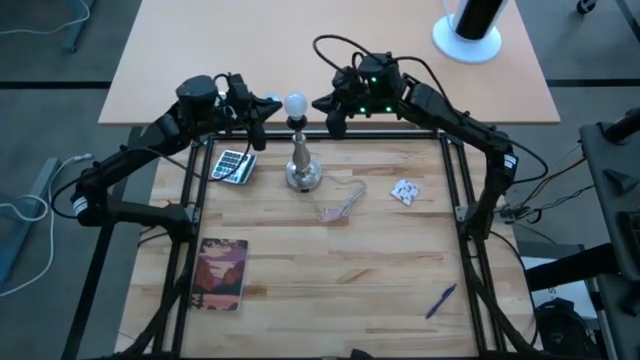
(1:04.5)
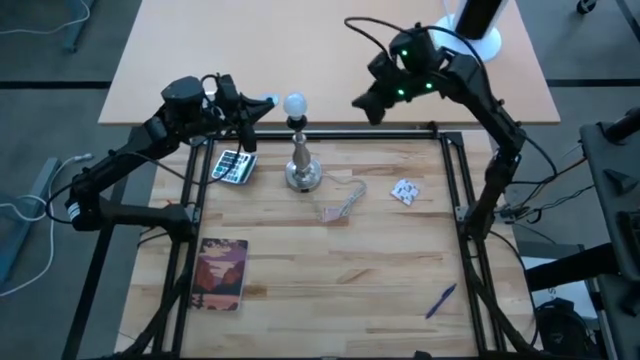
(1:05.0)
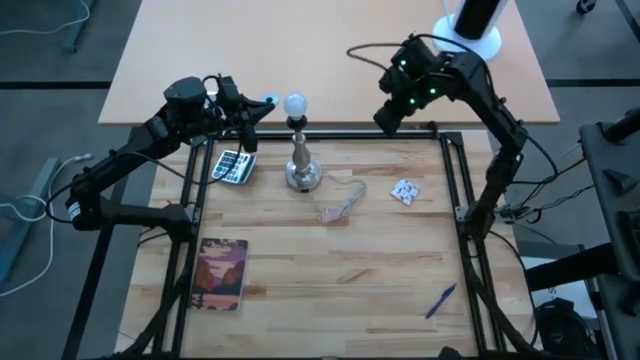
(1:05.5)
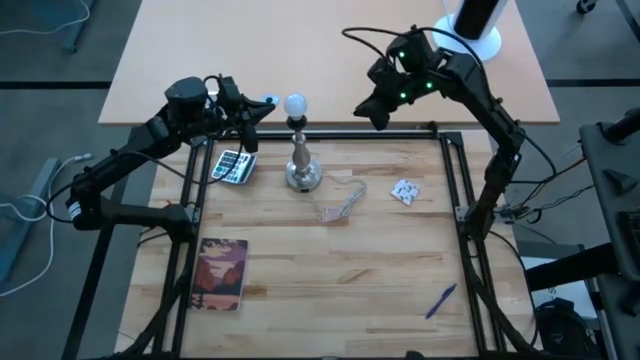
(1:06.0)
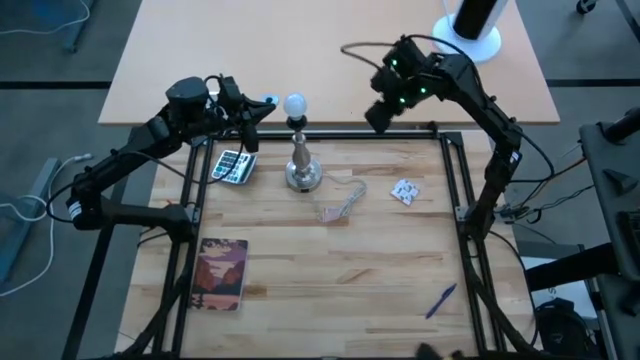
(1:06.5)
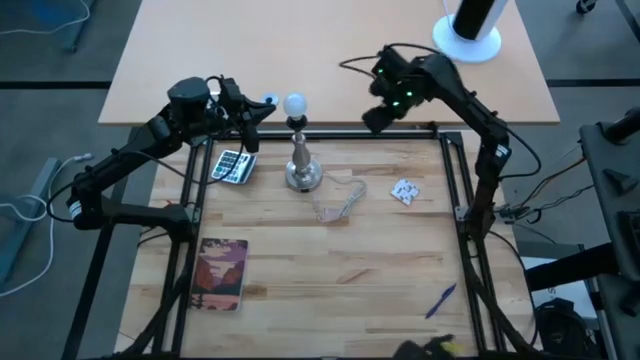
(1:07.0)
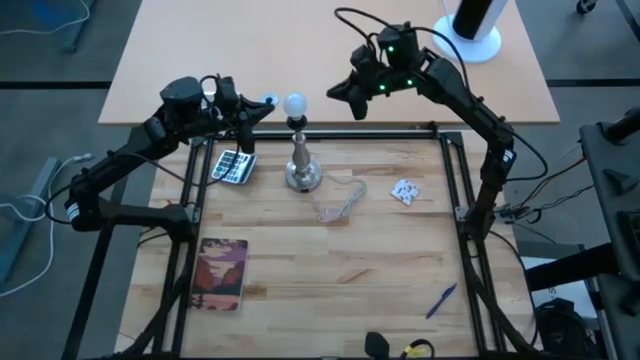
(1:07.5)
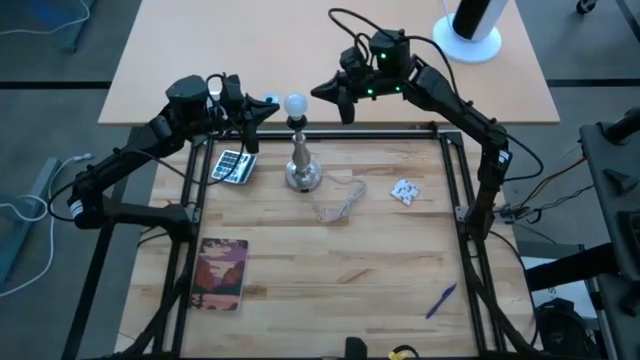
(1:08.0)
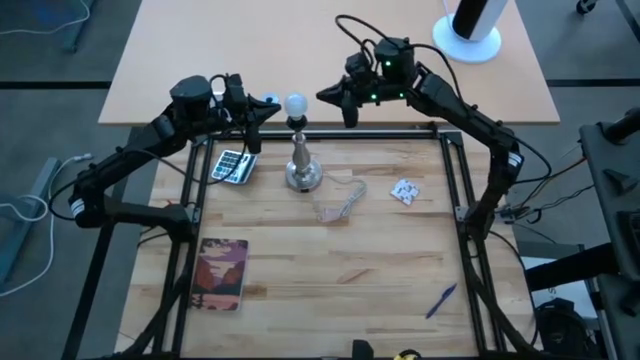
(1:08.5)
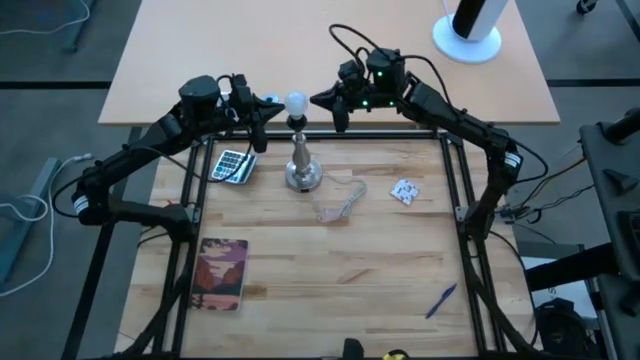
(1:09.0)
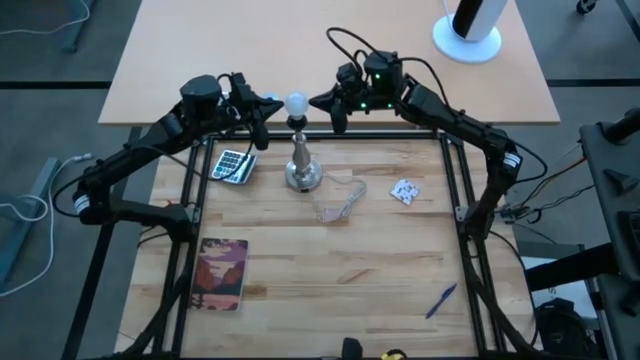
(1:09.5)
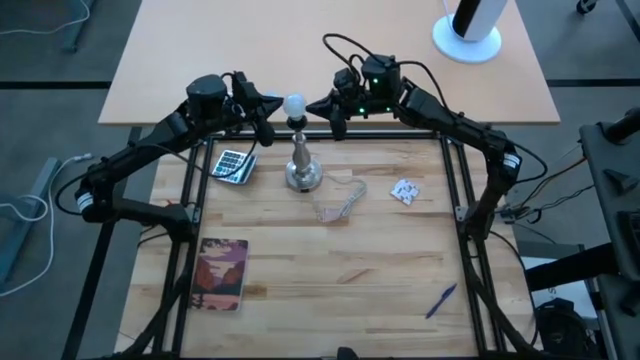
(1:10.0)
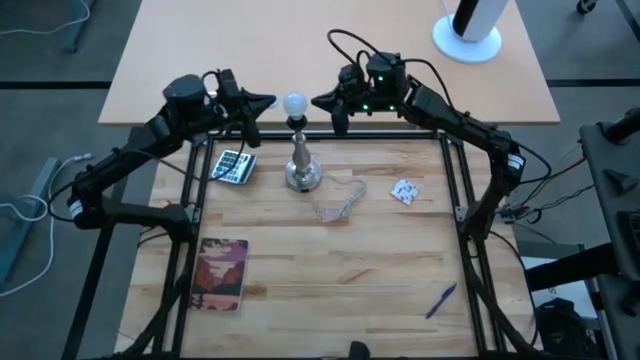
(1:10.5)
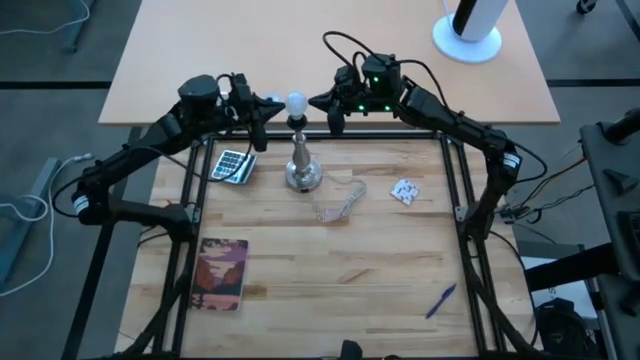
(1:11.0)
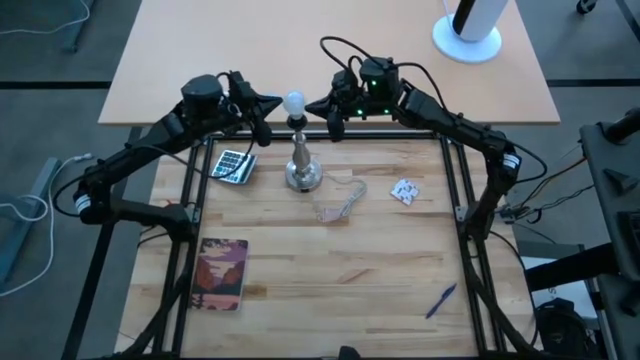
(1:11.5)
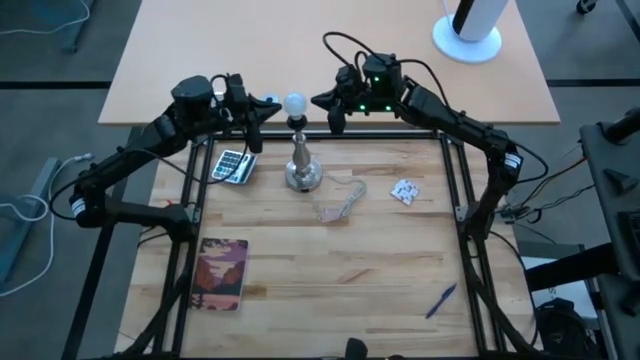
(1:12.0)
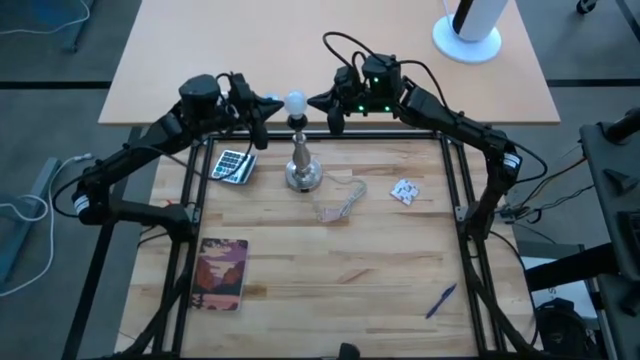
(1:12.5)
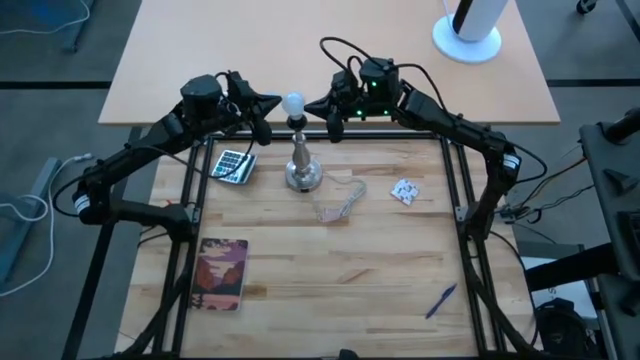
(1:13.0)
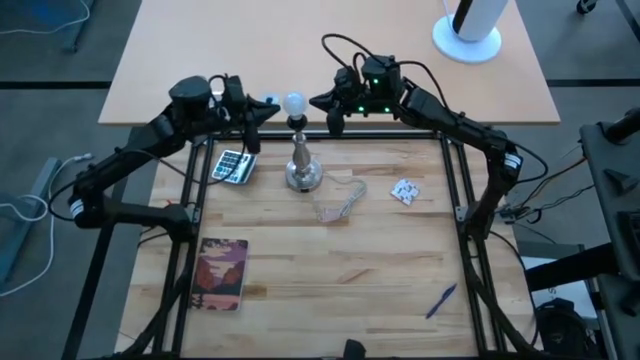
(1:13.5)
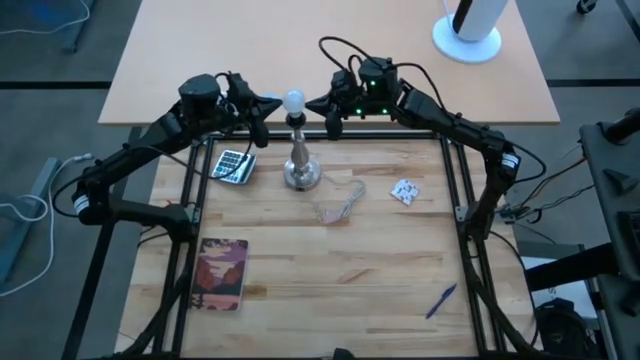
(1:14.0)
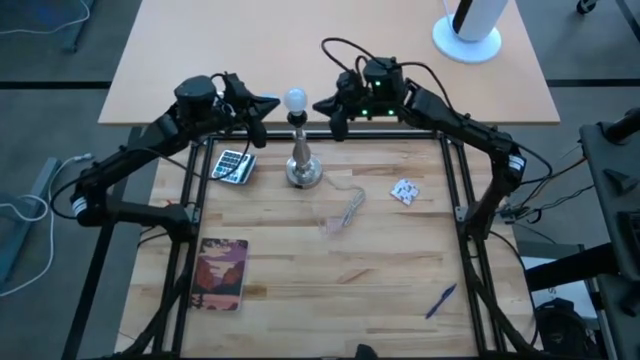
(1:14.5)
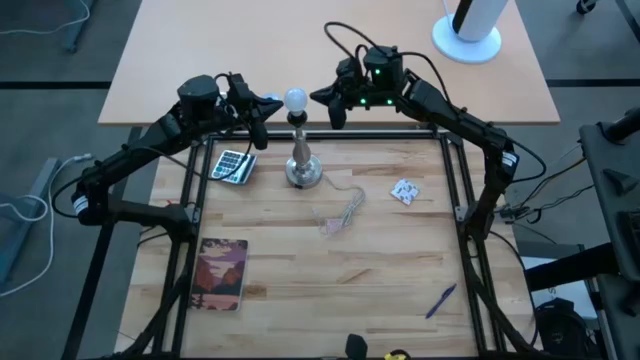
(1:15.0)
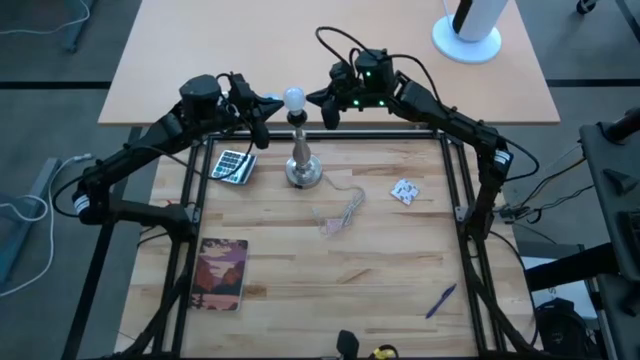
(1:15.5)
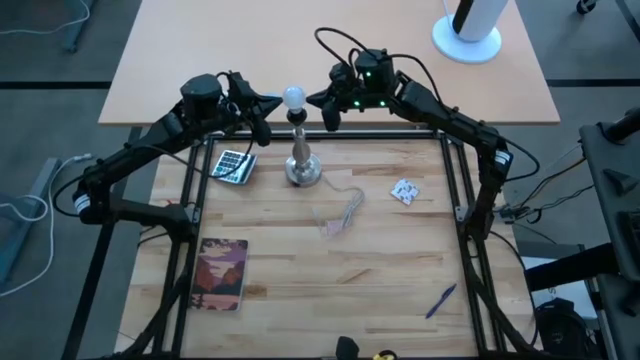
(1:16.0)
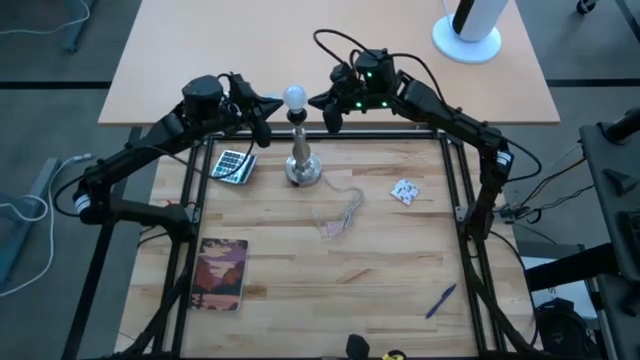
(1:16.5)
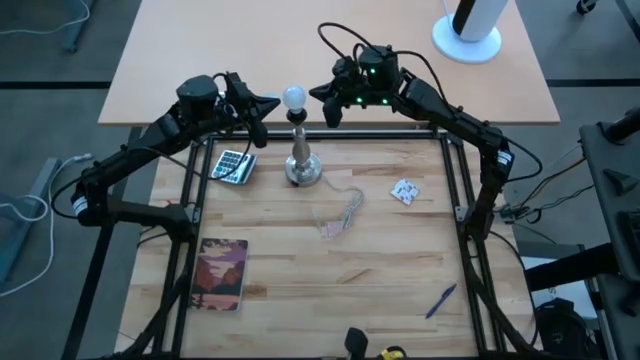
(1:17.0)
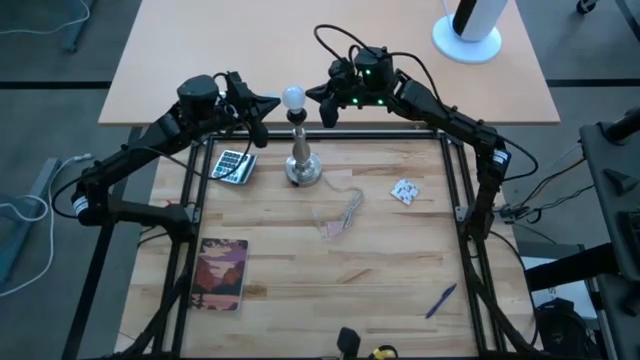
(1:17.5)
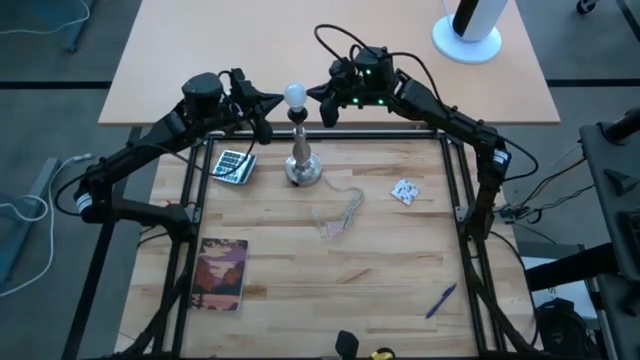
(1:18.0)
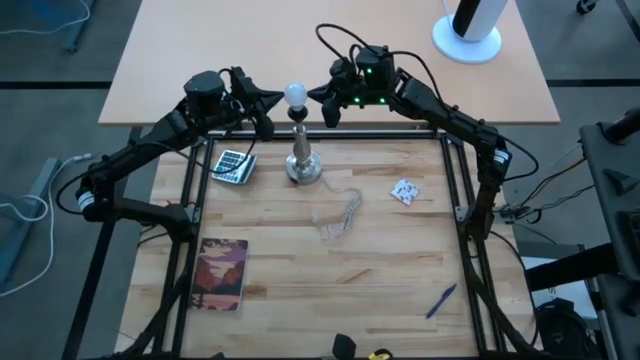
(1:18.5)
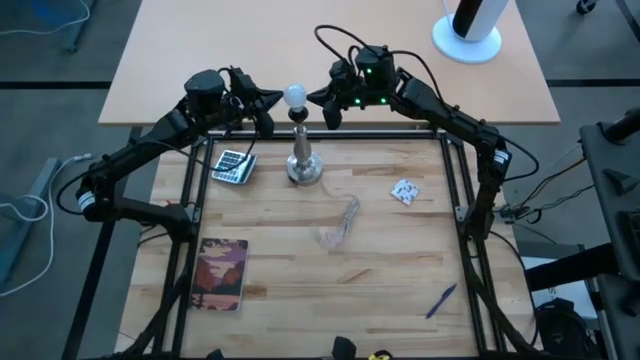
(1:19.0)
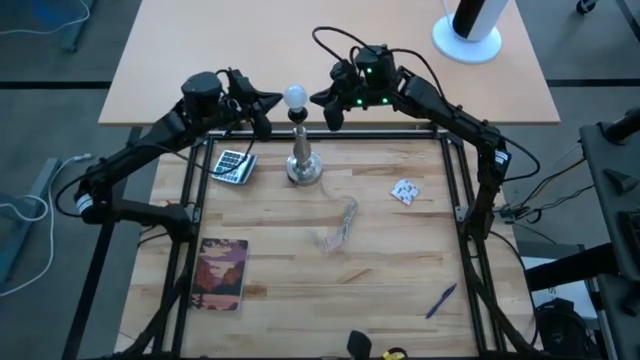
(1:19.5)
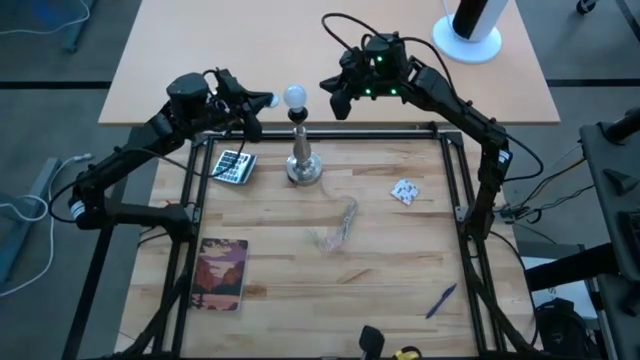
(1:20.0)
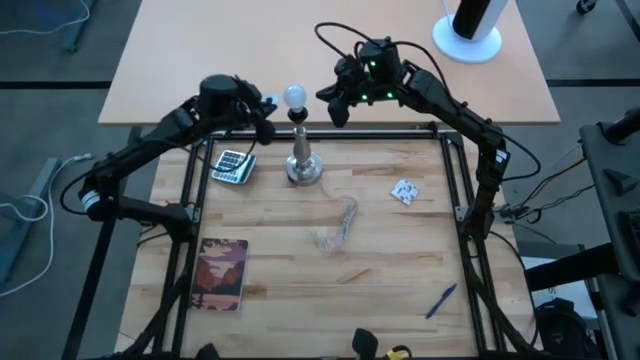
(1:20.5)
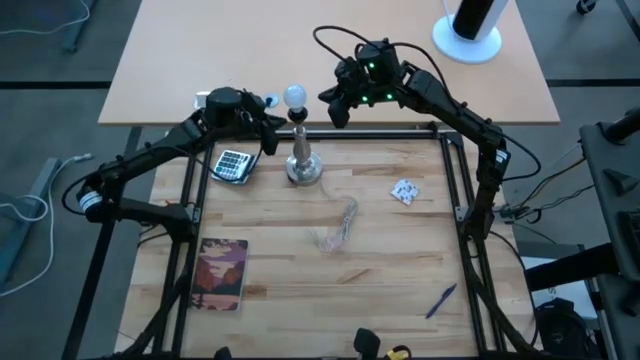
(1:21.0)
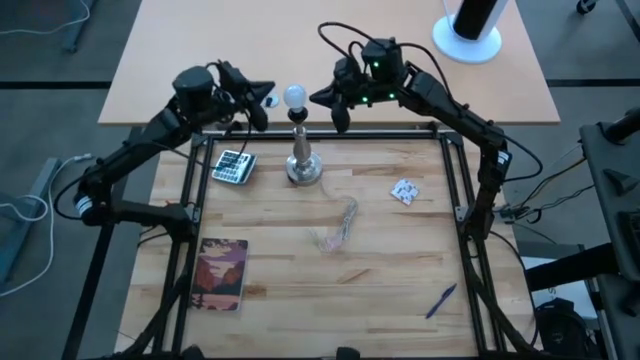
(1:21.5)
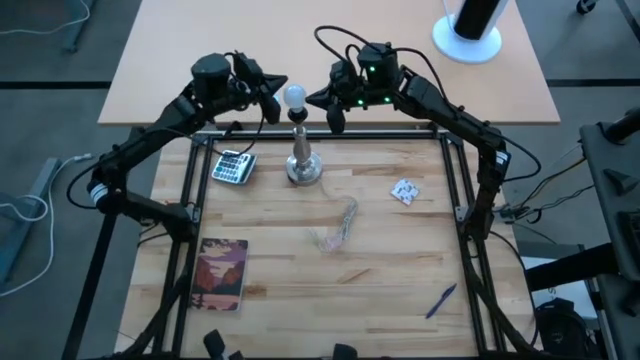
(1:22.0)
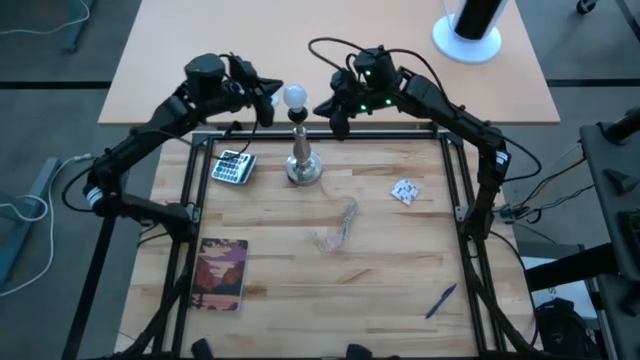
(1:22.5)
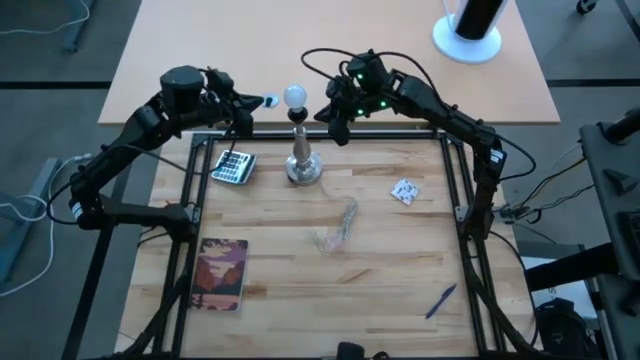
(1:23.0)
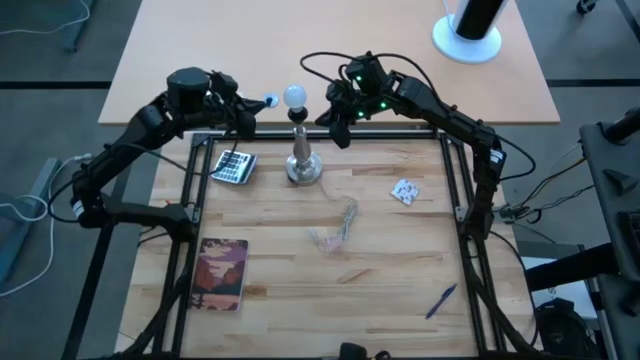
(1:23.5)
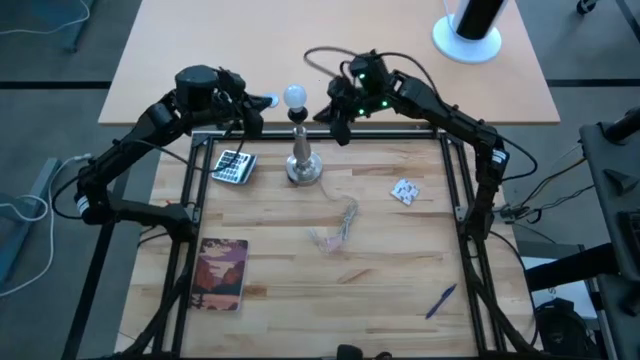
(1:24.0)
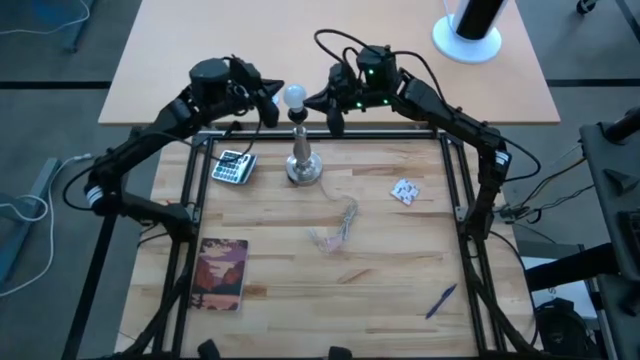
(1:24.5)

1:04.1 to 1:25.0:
Task: Screw lightbulb
Insert the lightbulb into the lamp
